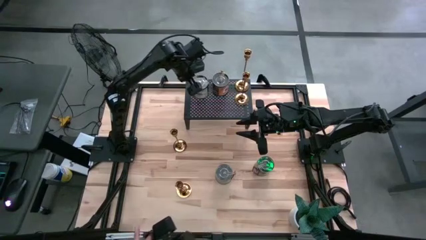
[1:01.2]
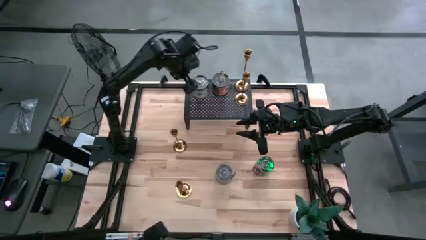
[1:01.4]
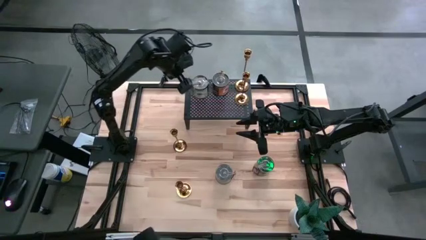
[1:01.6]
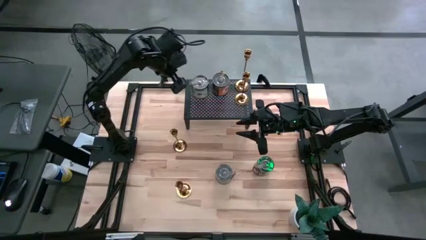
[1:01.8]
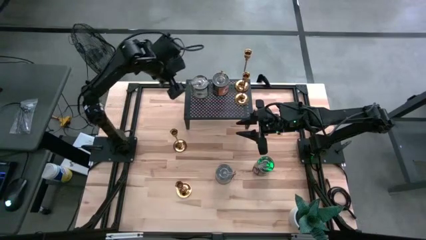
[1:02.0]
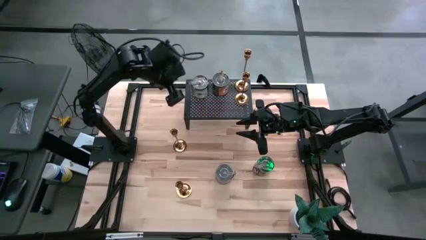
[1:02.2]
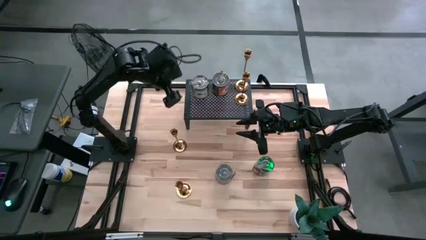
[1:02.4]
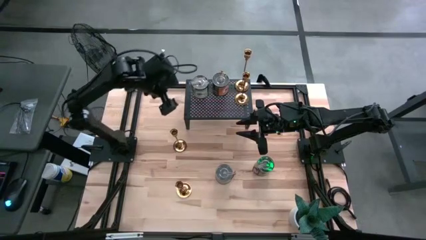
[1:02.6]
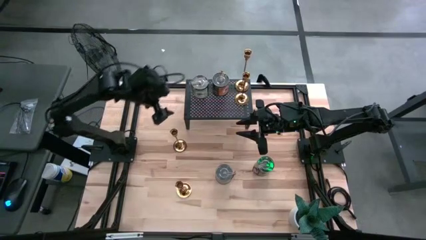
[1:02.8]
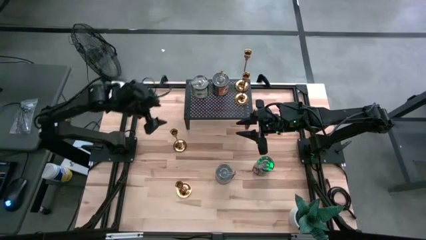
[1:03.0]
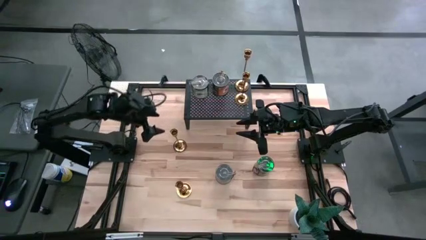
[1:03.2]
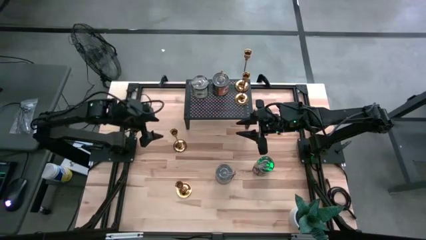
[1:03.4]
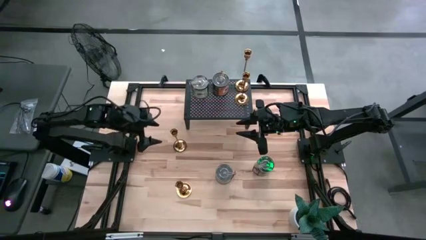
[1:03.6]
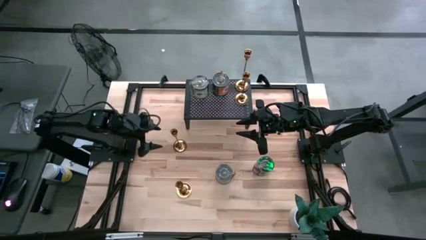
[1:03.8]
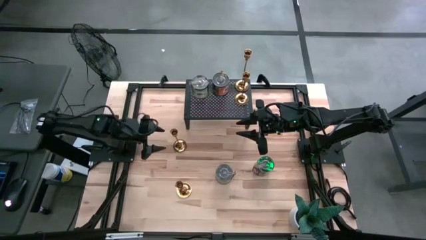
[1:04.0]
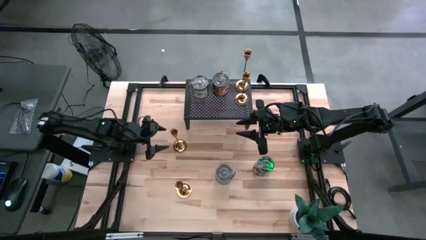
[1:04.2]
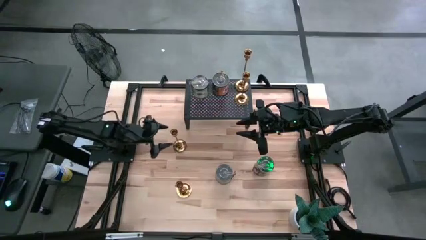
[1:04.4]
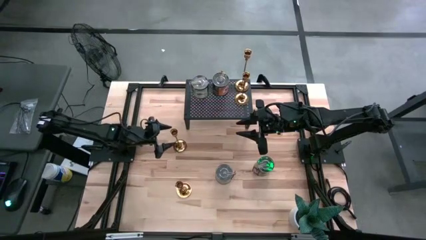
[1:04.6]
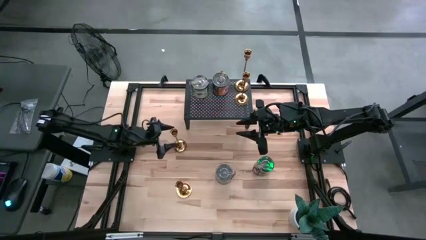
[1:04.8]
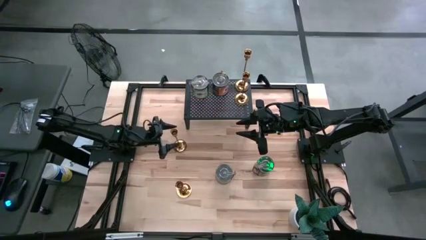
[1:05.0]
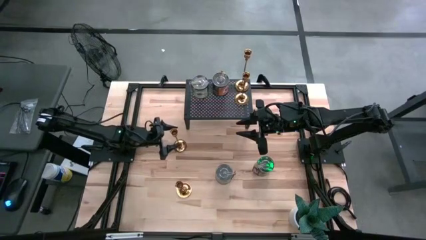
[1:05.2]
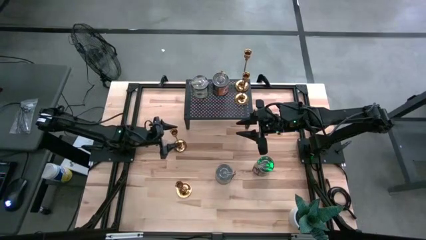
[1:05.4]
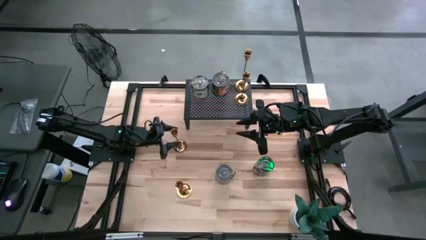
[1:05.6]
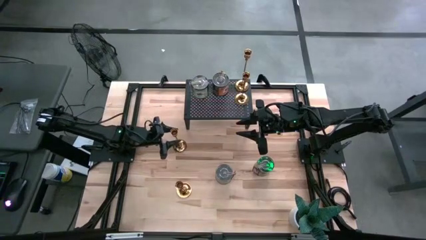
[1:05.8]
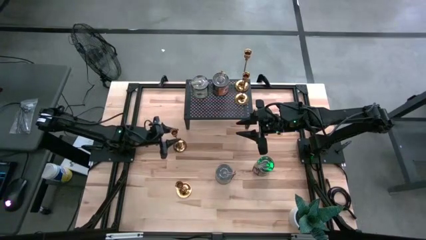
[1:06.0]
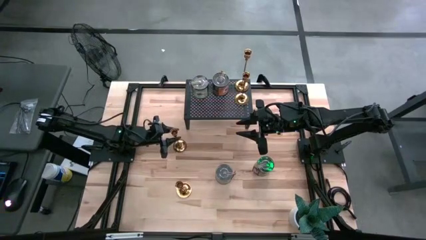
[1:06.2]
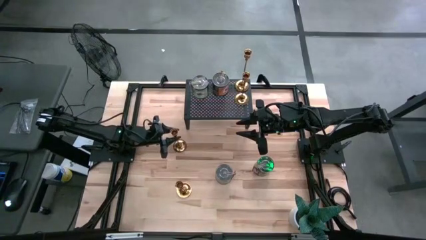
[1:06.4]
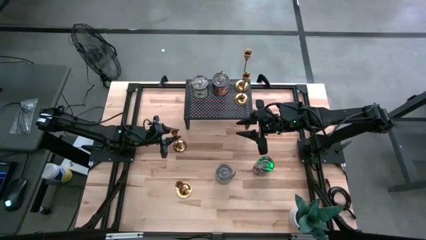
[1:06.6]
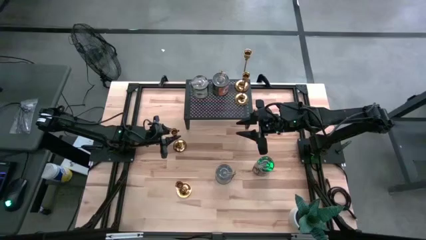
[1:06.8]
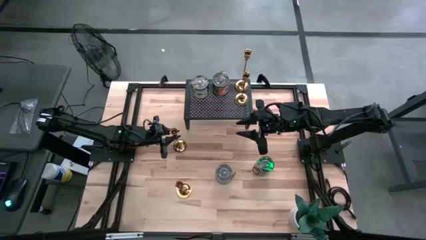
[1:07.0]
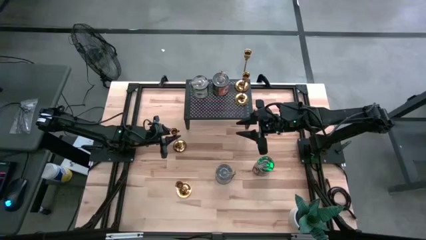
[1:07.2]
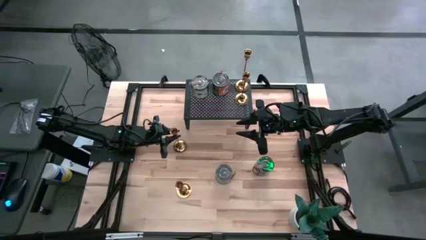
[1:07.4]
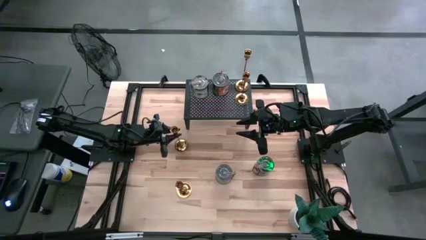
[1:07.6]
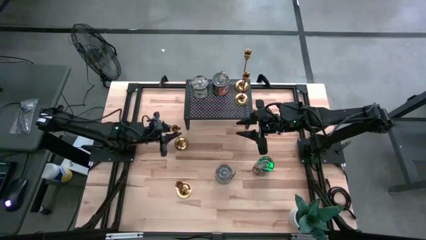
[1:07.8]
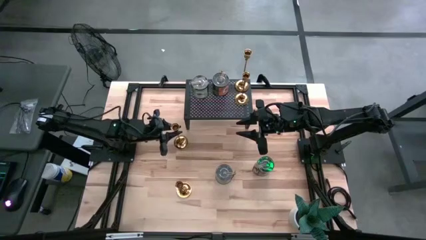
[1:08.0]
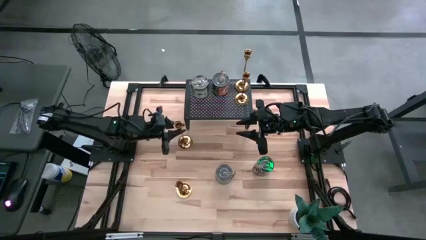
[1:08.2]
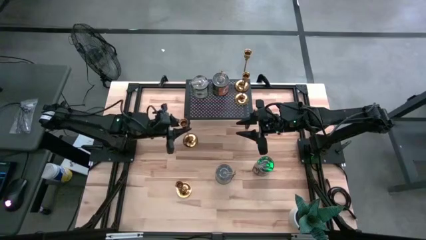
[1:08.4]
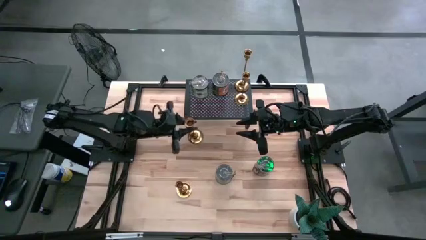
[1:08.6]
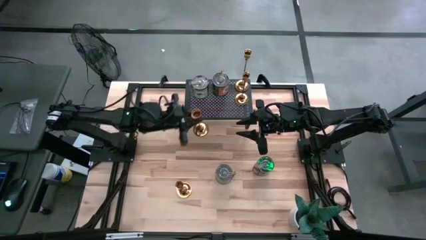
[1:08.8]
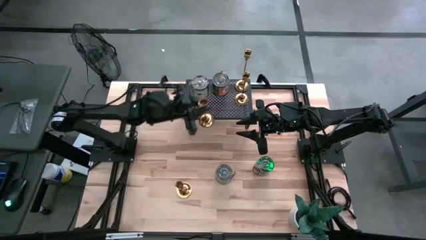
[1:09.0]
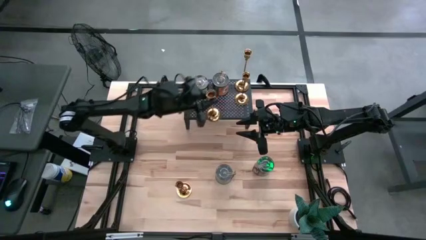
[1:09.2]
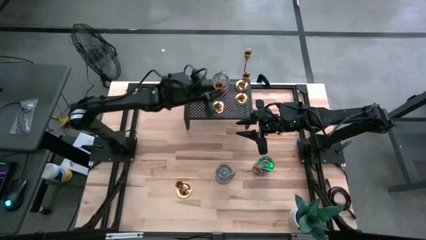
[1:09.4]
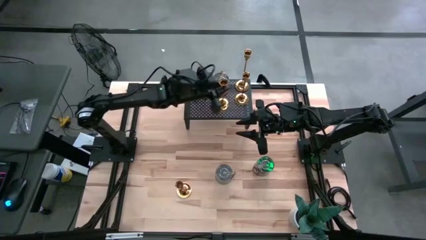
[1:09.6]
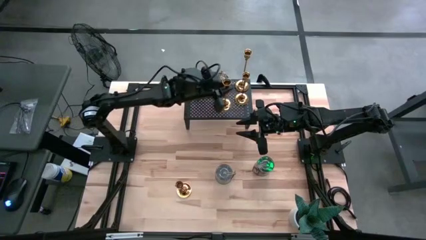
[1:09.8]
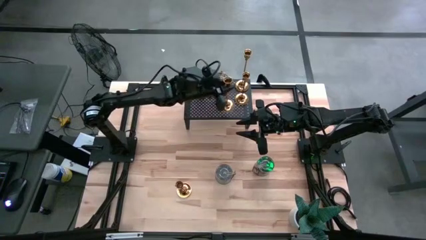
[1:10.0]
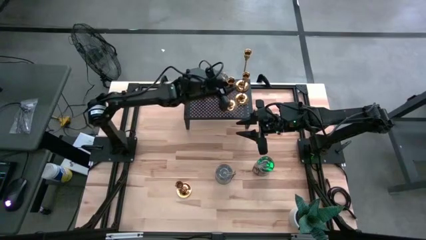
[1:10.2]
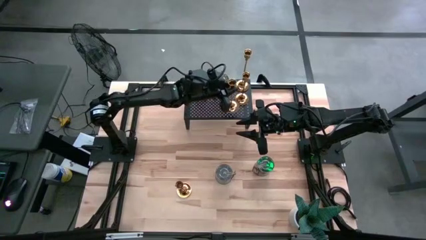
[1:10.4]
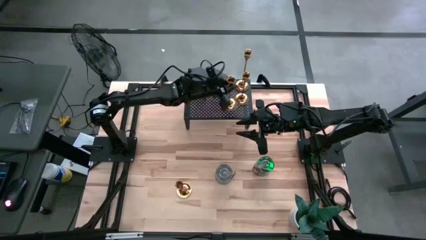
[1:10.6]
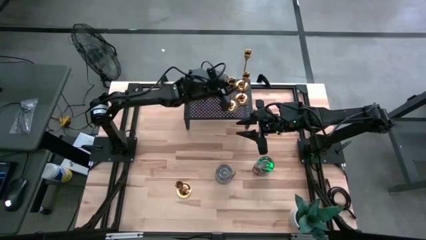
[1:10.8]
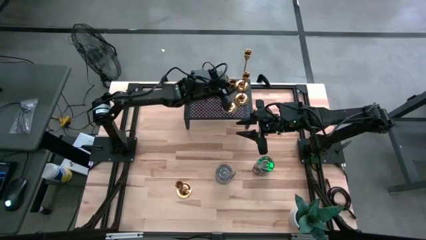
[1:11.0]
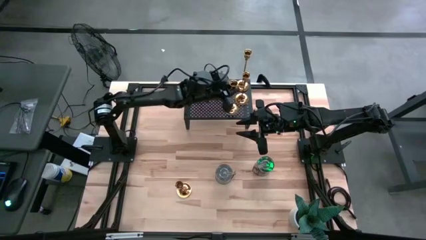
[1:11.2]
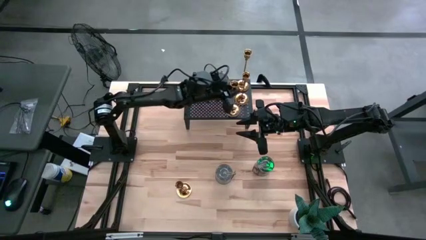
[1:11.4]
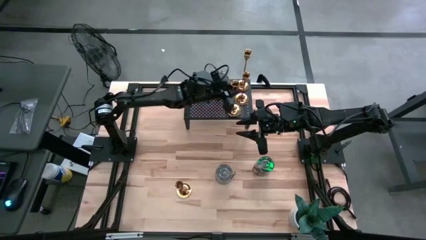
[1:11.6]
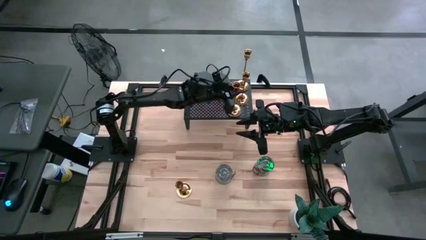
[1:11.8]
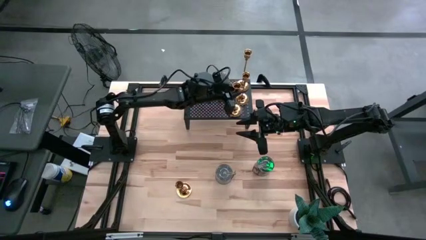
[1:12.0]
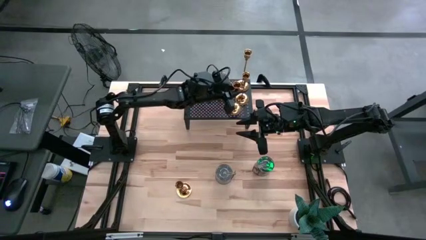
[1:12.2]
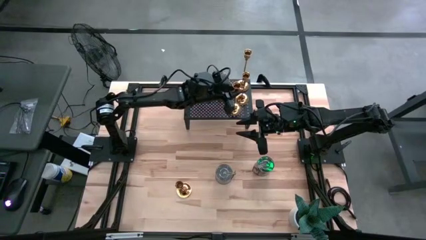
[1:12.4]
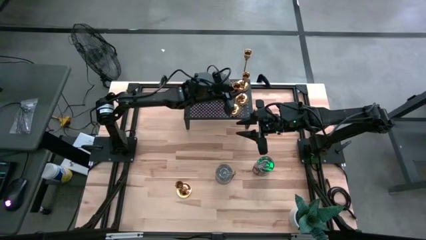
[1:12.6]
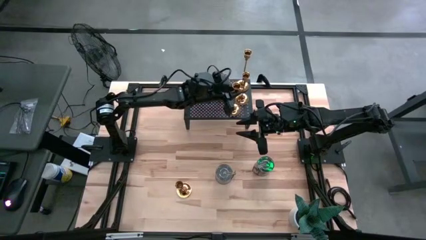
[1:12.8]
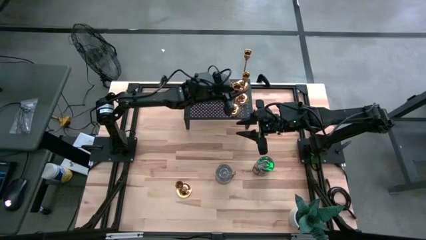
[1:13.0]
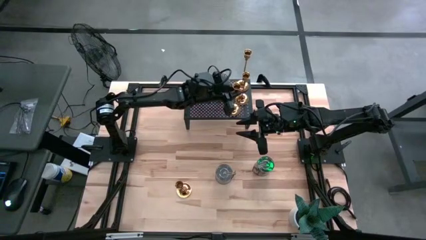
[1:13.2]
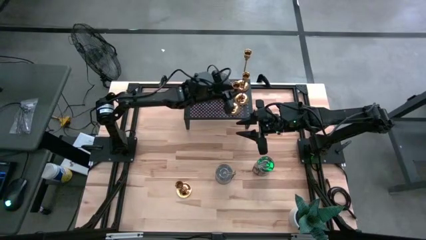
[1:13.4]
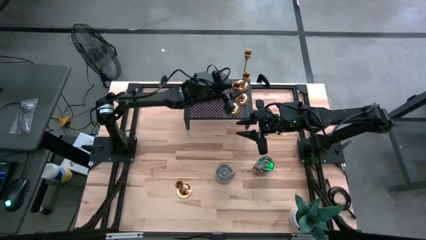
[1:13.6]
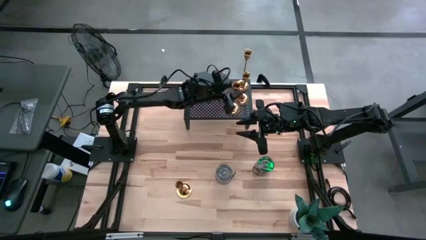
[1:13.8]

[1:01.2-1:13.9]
Task: Pick & Place candle stick holders
Put the golden candle holder on the shelf

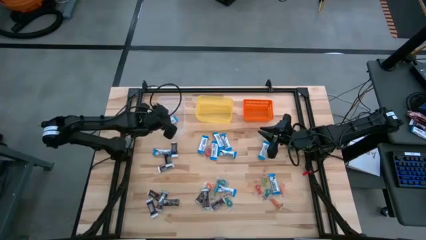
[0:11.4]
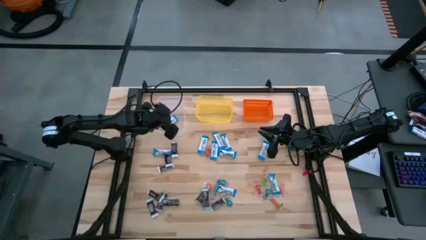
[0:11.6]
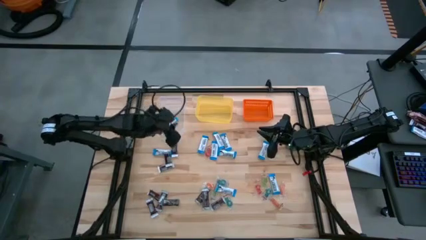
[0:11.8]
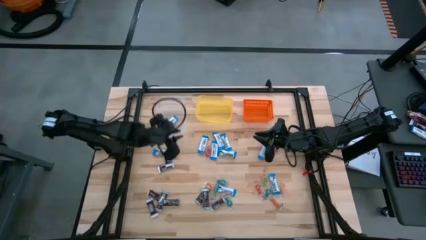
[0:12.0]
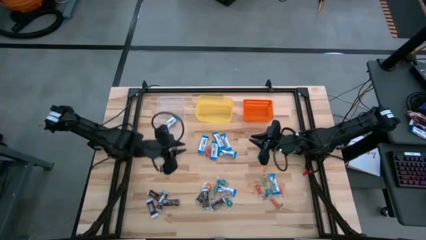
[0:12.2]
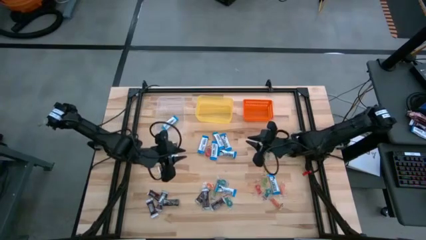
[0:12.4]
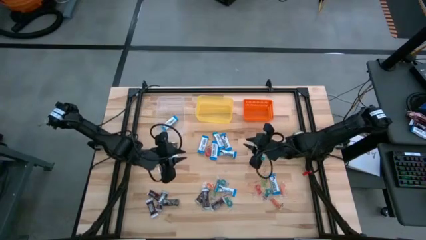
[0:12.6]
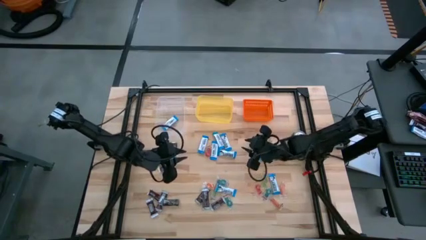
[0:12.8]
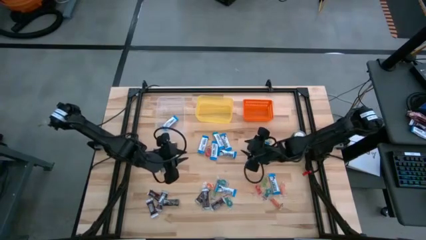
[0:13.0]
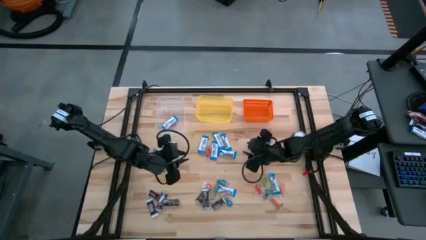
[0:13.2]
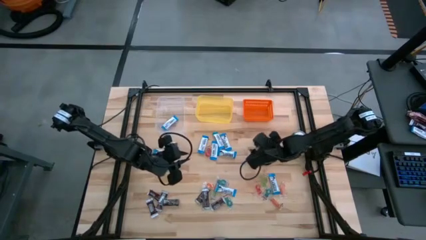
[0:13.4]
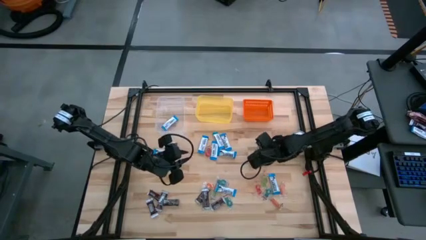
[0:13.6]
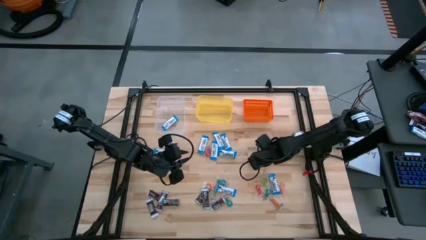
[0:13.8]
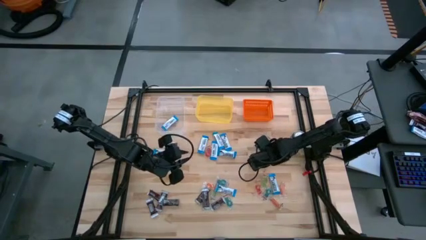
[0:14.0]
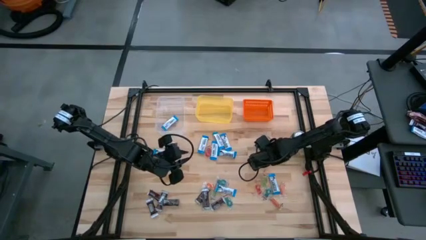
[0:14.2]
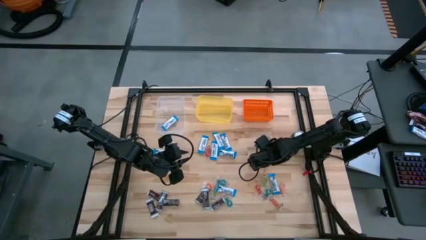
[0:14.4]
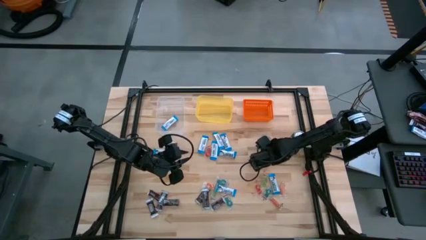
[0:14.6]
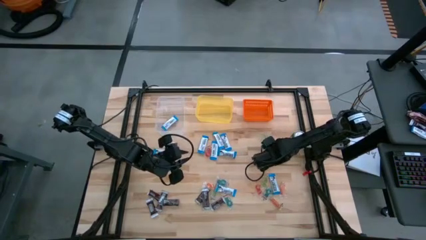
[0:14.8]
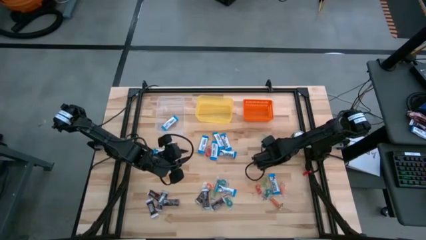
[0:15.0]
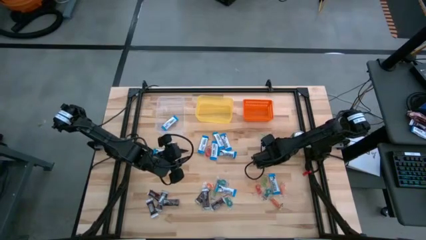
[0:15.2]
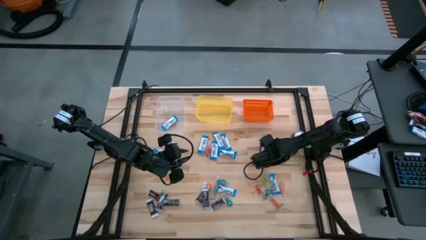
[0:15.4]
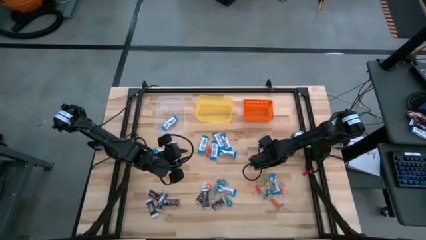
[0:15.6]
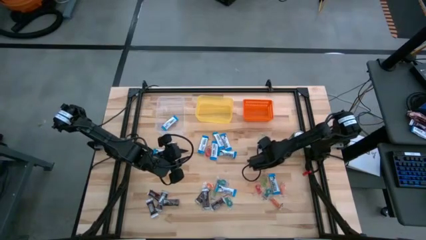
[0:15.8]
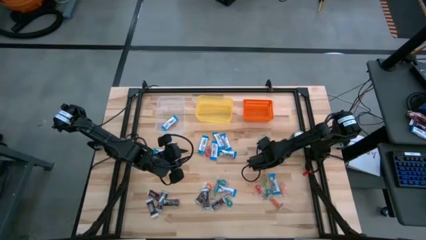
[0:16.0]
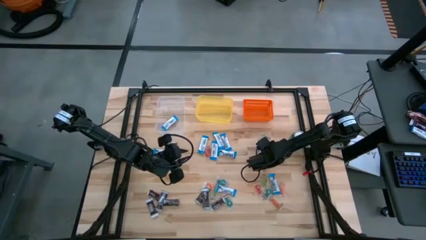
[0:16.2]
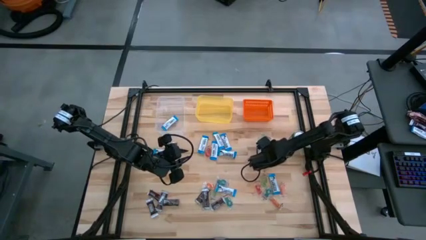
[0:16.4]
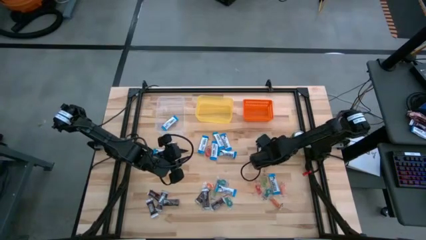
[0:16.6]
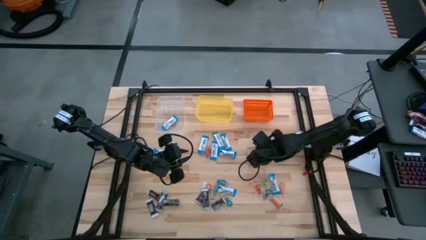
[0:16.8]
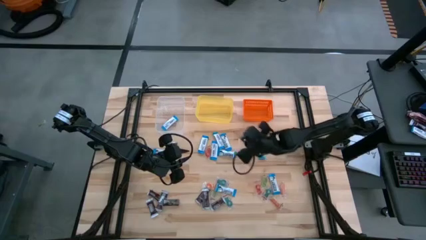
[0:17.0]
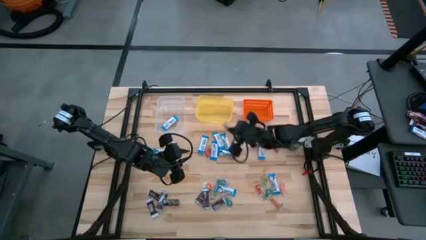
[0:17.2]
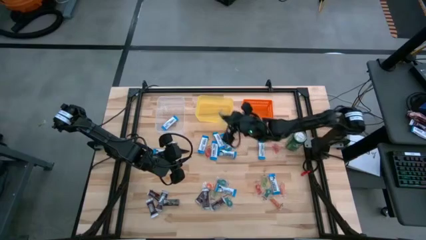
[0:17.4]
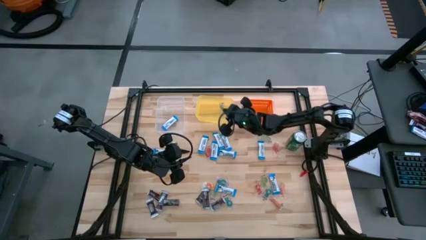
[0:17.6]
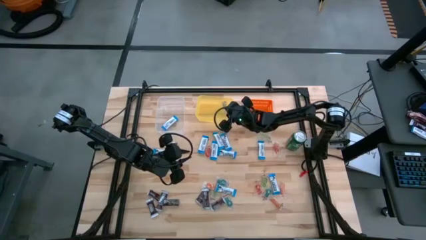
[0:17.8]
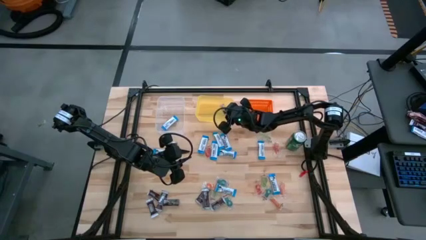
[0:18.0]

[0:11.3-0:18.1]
Task: Sort candy
Put the green gummy into the yellow bin
